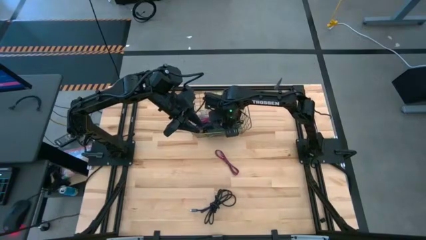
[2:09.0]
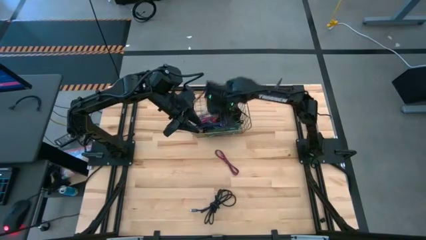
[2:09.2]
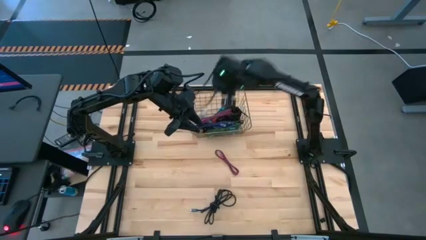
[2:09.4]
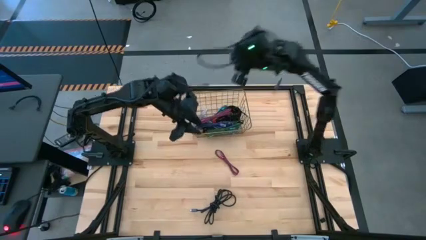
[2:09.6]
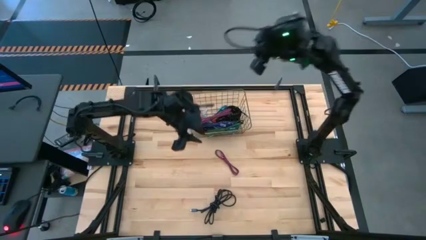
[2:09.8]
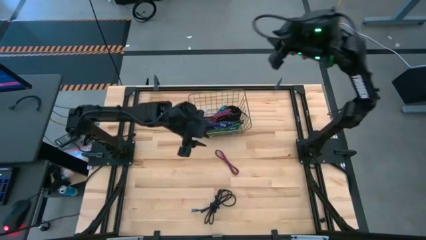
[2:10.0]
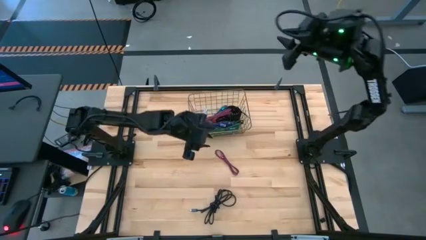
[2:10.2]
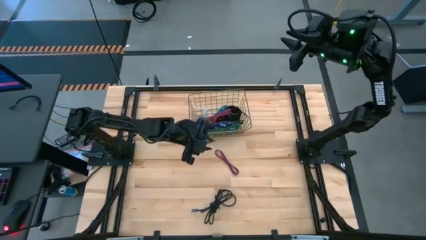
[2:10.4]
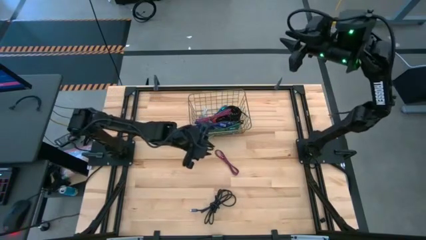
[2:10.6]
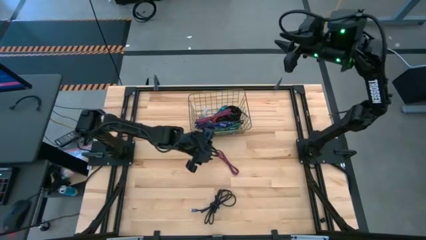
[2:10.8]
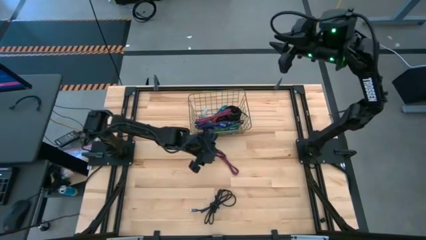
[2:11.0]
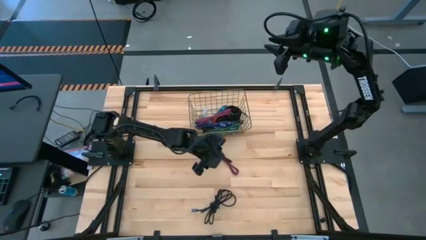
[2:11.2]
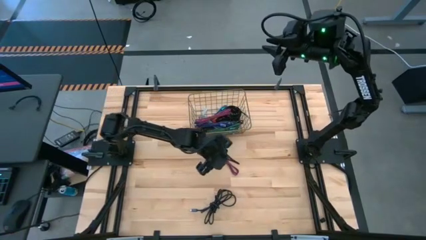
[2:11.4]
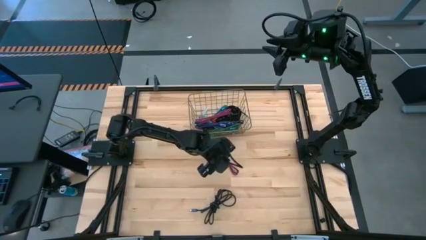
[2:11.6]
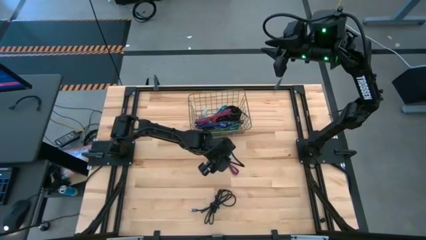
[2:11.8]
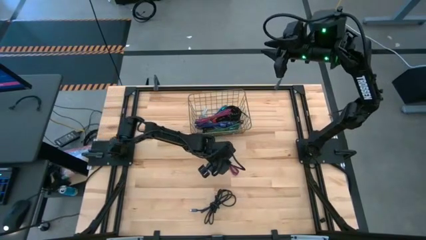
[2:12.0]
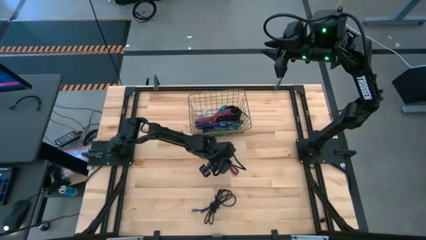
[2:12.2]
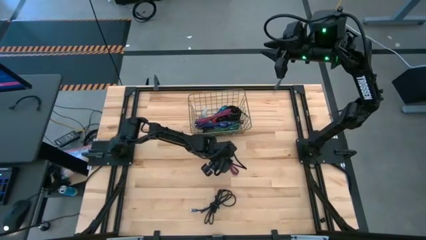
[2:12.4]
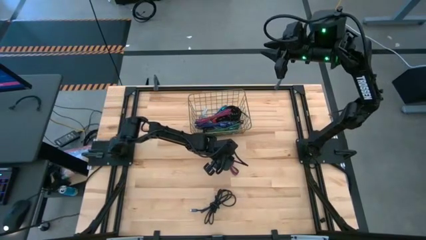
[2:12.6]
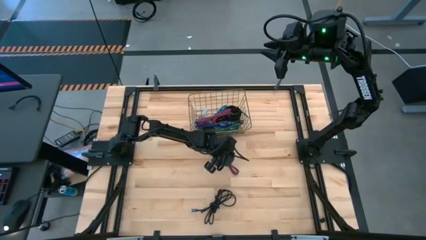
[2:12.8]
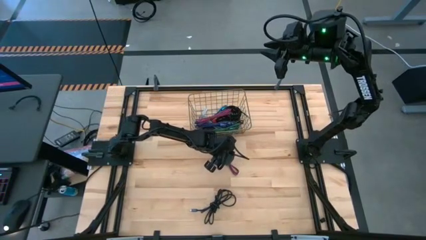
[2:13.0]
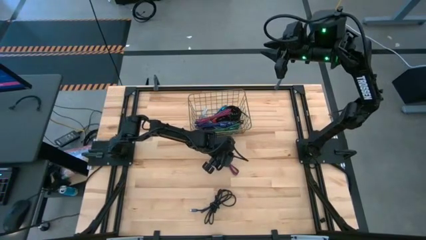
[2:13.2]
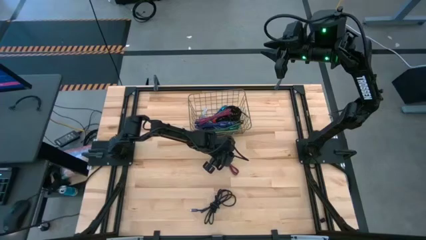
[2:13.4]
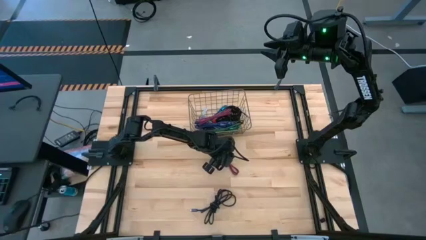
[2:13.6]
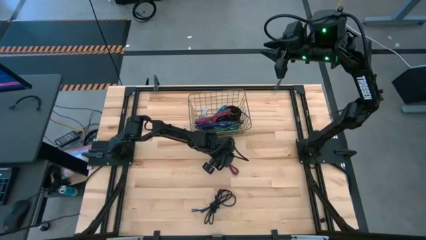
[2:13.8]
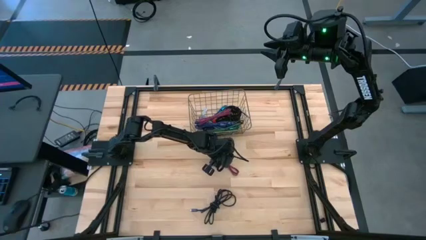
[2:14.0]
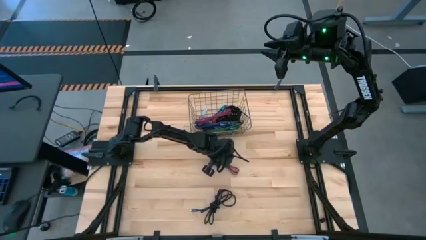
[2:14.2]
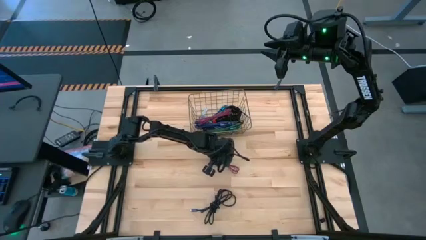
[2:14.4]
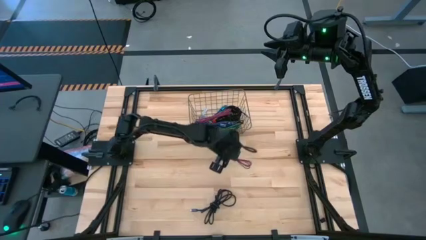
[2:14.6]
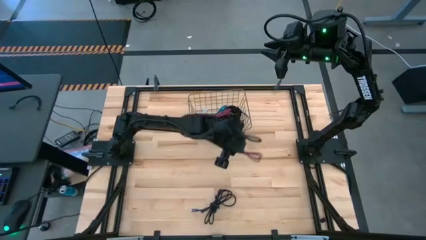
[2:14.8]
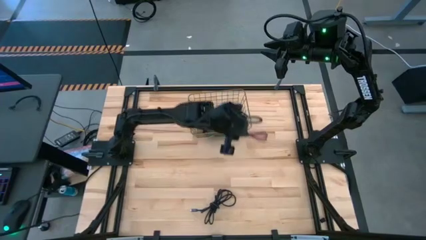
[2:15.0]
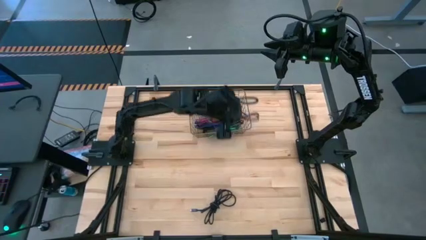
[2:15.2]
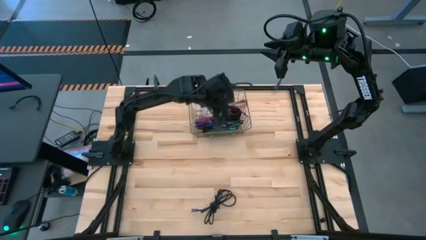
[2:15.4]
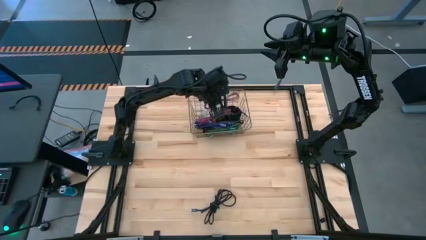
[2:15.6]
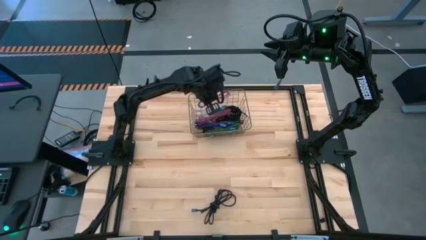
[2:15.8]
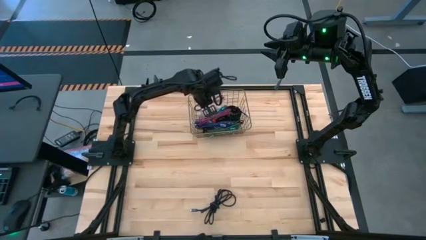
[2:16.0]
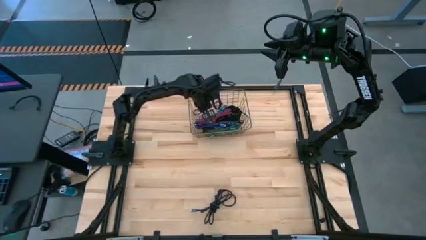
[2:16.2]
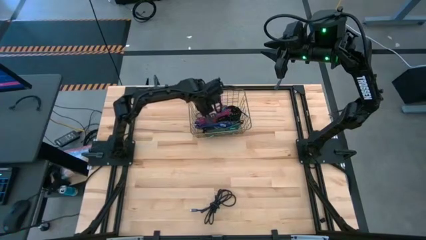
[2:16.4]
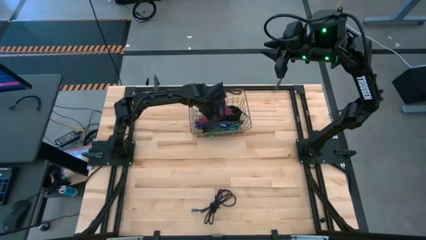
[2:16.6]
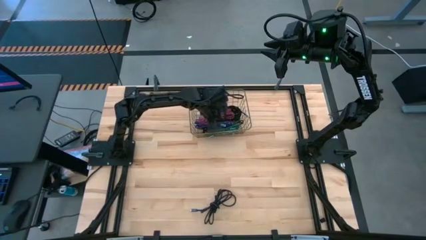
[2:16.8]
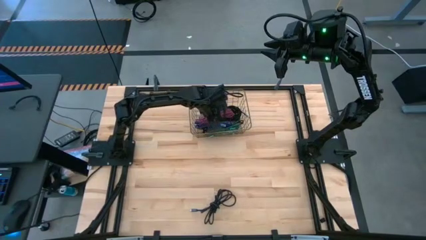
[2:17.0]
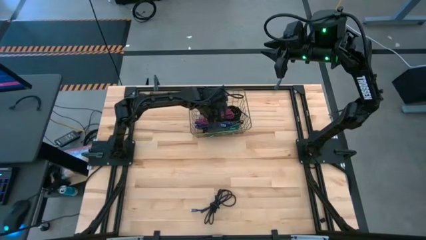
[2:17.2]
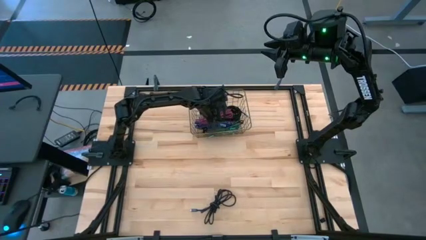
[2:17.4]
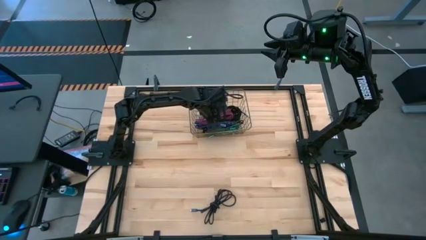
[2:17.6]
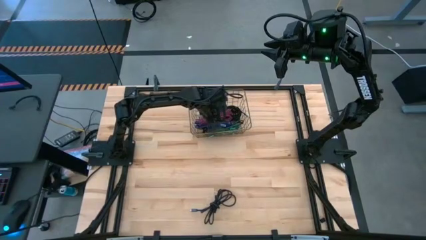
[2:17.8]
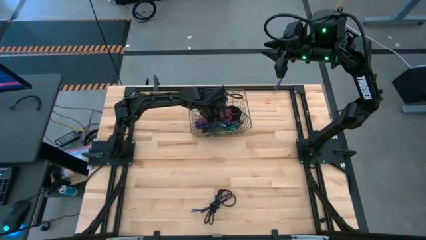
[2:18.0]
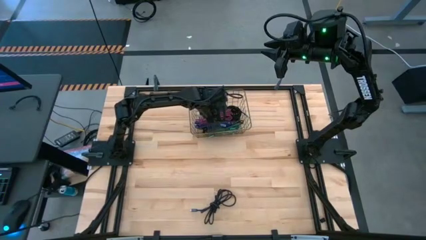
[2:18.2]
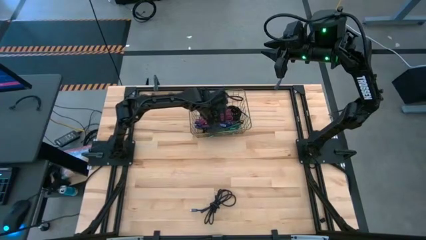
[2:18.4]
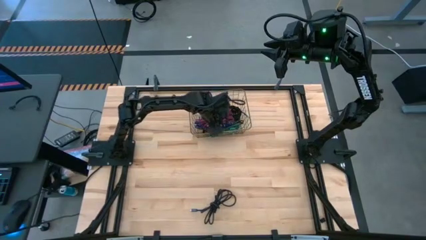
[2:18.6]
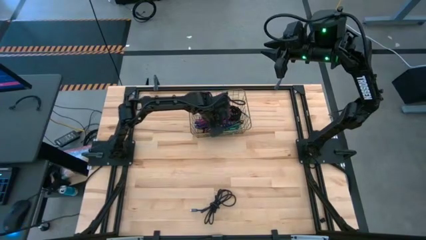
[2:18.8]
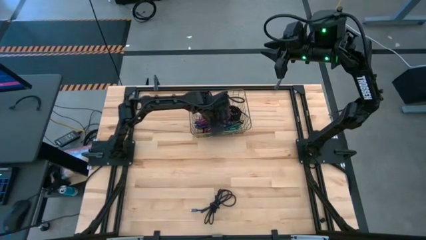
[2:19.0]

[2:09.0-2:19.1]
Task: Pick and place USB-C Cables
Put the pink charger cable into the wire basket

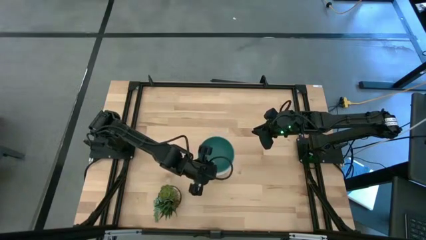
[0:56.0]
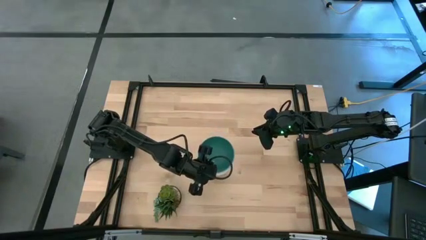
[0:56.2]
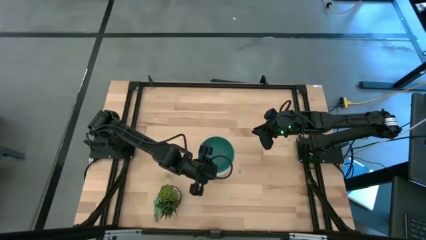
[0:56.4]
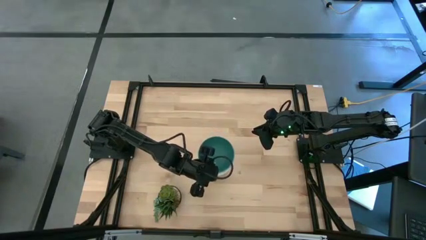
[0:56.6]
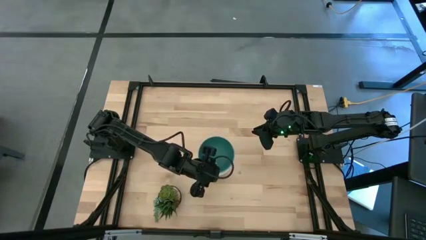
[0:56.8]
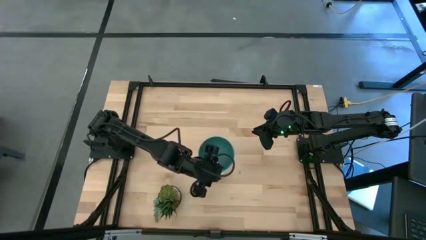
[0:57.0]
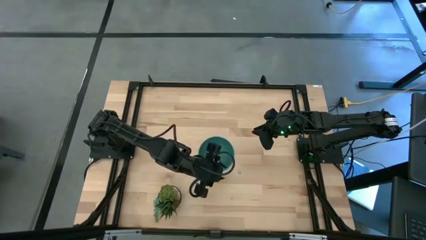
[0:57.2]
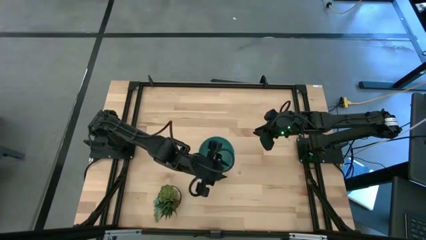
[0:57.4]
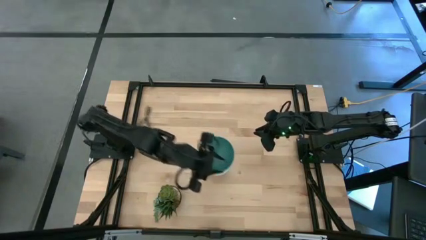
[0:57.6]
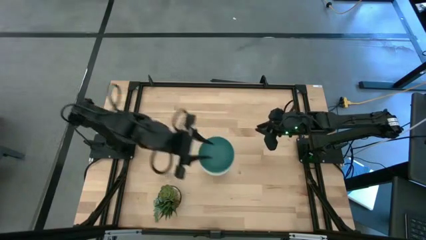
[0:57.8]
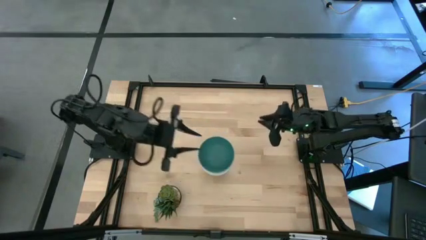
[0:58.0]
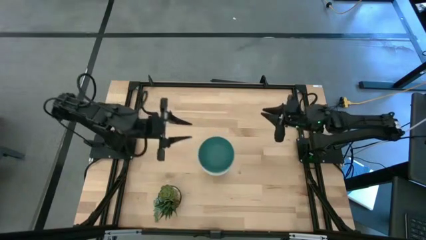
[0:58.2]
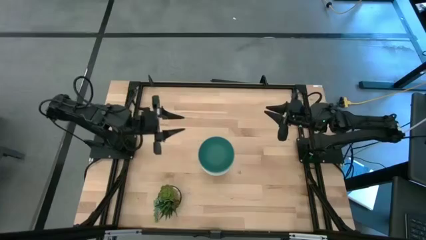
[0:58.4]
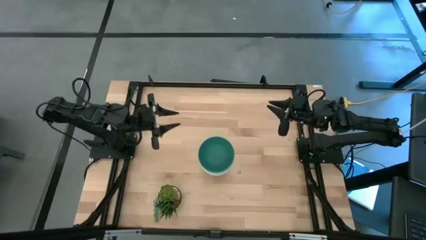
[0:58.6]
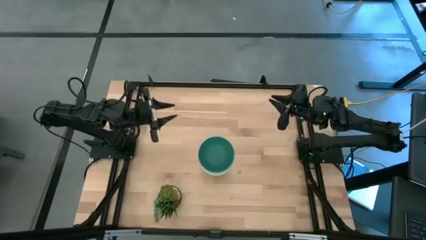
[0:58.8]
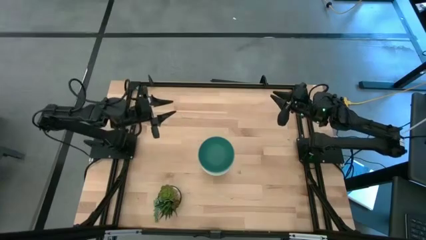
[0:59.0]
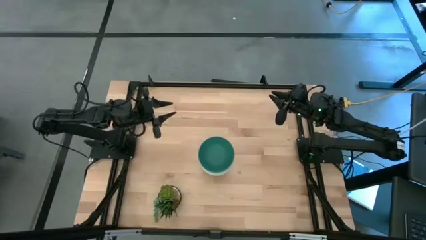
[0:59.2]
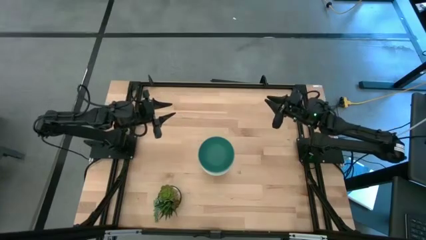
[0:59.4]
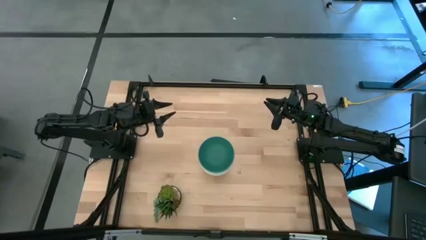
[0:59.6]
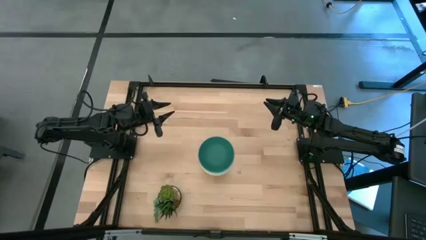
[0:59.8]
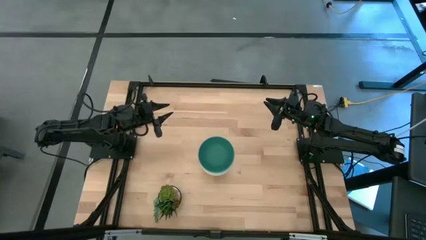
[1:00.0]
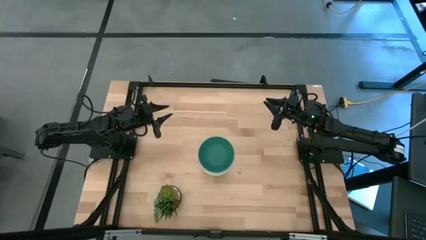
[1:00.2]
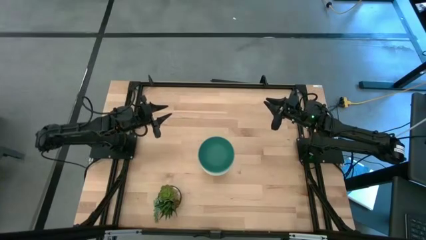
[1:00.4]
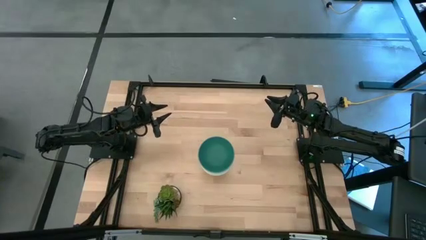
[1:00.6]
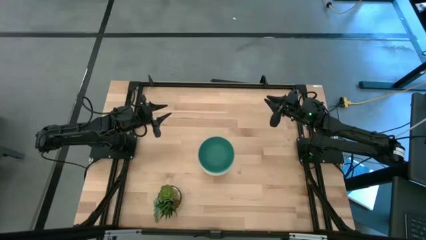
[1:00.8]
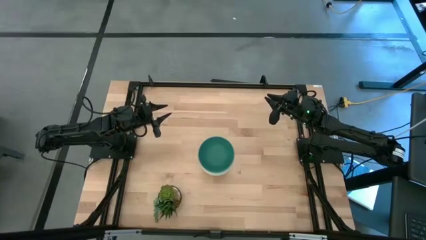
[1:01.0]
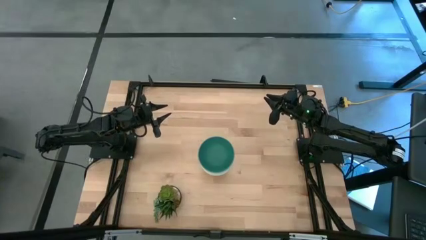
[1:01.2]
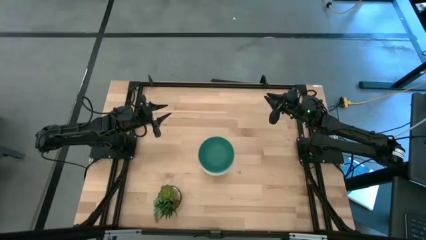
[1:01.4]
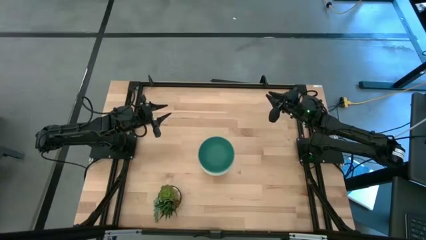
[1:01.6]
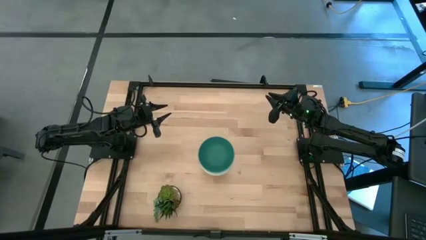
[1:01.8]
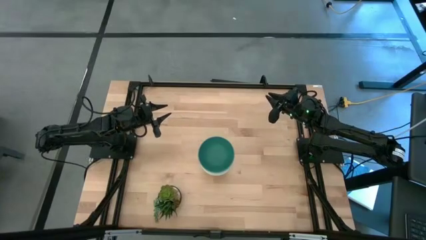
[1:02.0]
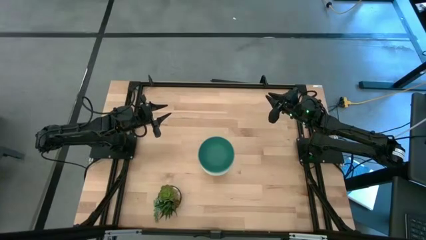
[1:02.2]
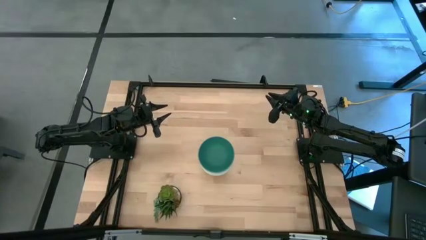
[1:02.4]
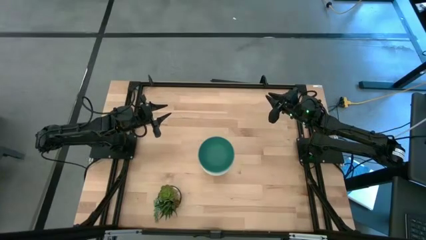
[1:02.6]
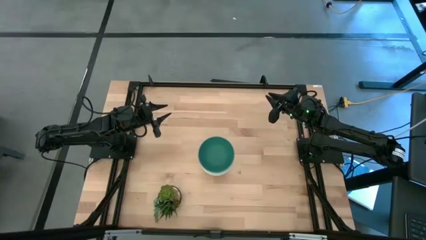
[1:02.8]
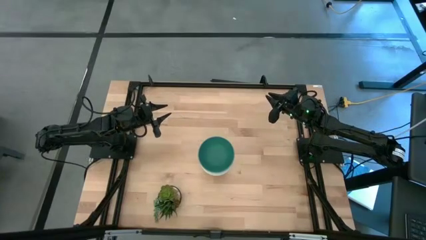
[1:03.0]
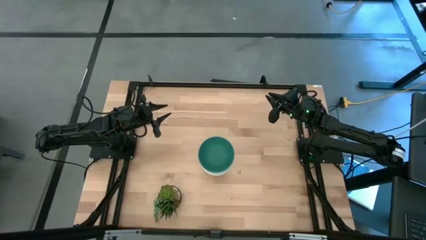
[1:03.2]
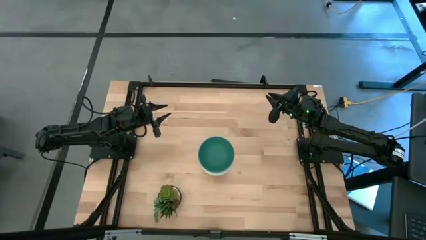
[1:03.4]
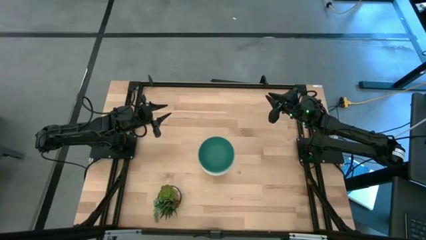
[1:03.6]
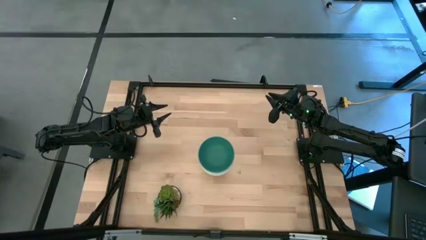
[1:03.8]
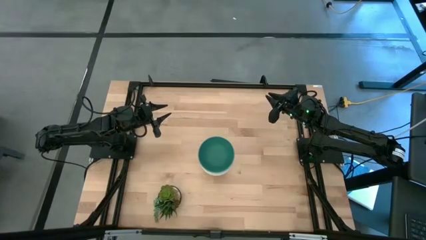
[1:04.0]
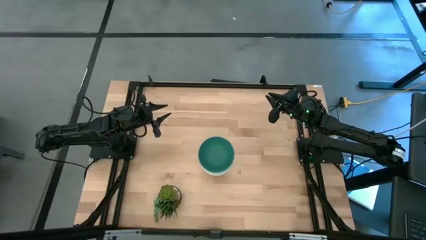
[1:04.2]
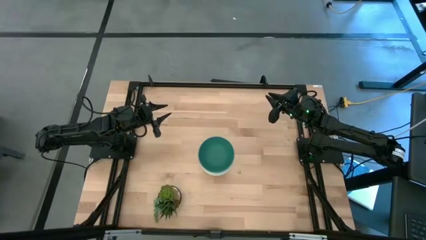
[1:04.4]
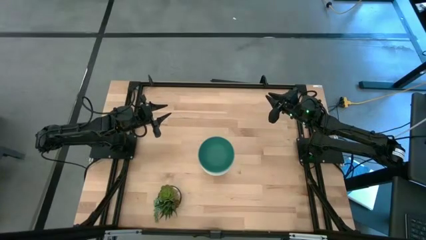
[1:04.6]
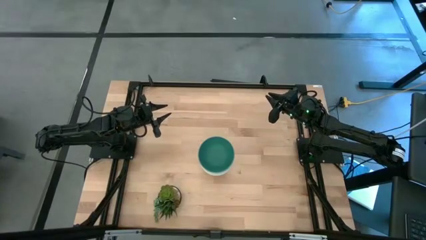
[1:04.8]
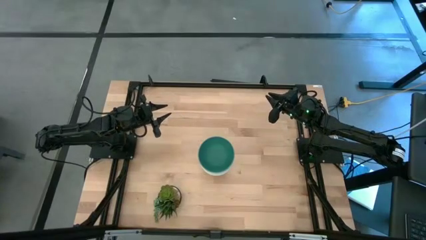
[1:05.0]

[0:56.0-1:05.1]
Task: Nest bowls inside each other
Return to Home Position
